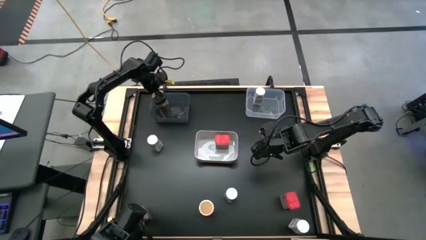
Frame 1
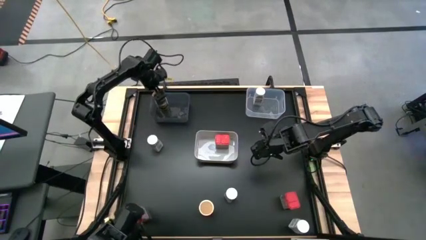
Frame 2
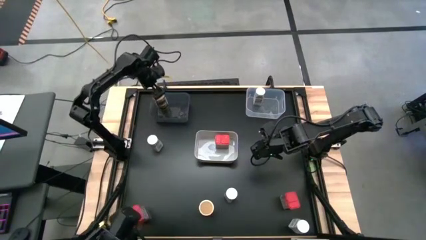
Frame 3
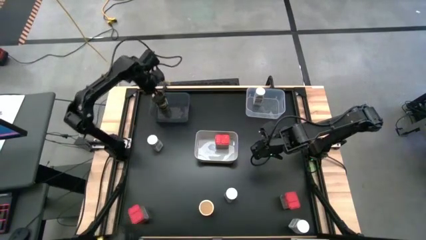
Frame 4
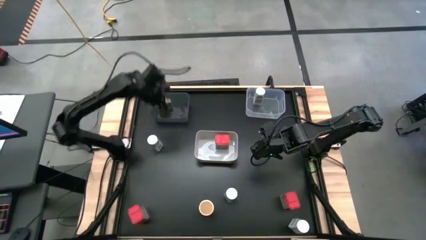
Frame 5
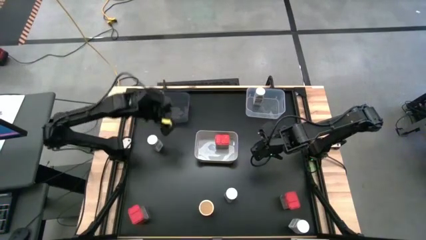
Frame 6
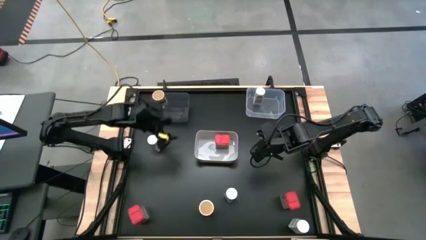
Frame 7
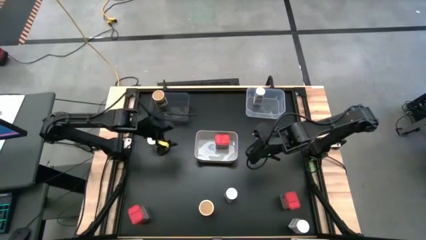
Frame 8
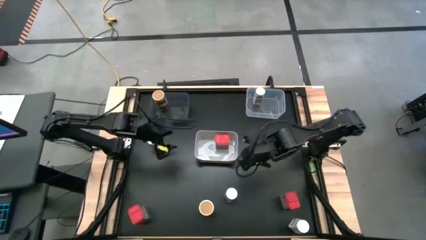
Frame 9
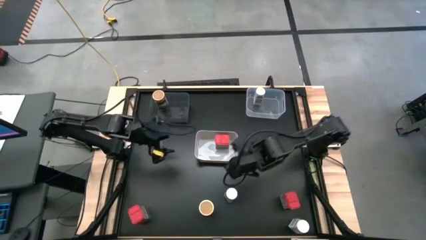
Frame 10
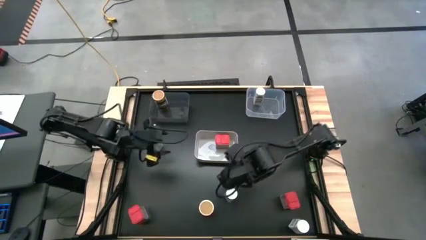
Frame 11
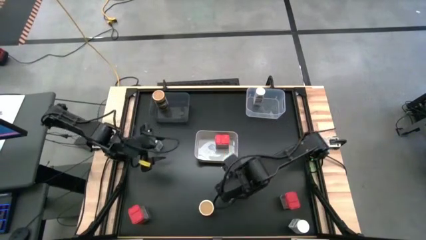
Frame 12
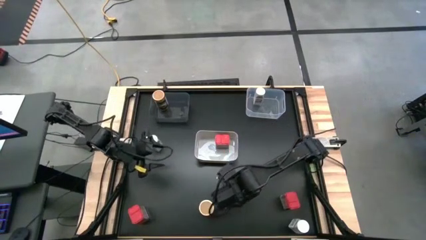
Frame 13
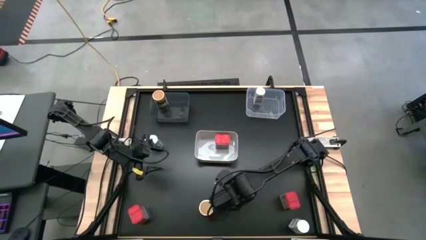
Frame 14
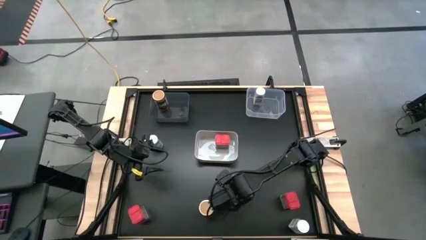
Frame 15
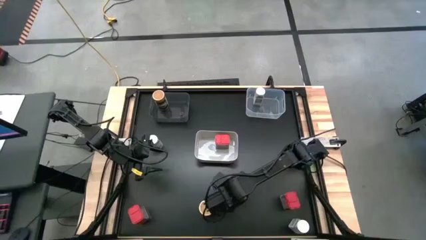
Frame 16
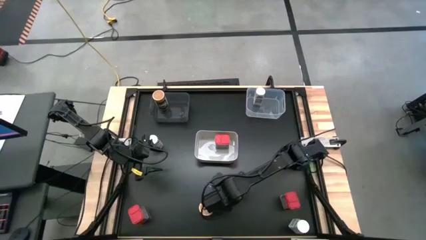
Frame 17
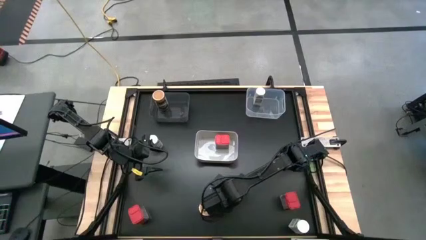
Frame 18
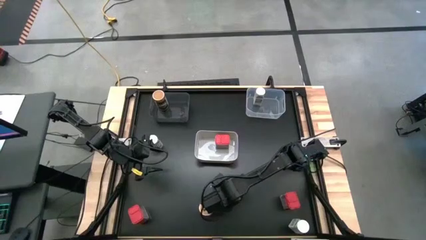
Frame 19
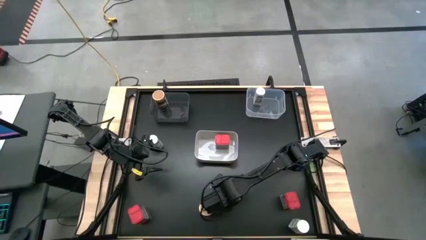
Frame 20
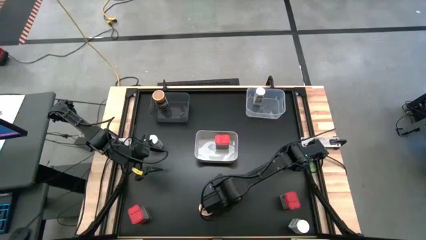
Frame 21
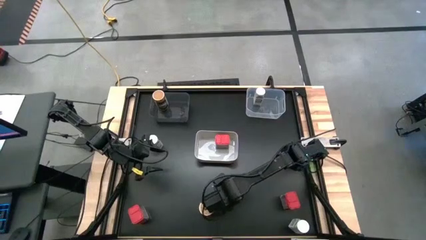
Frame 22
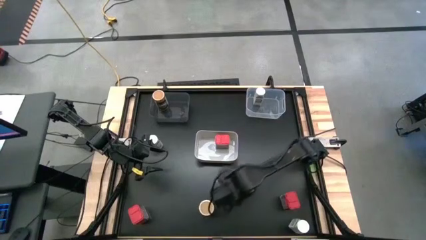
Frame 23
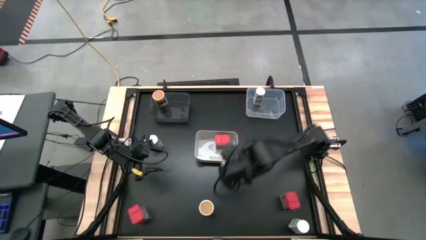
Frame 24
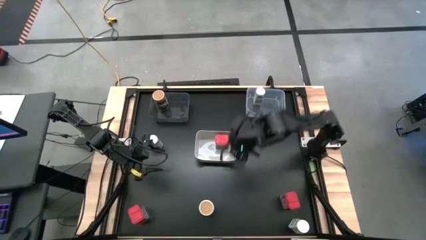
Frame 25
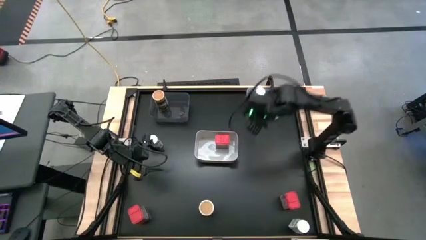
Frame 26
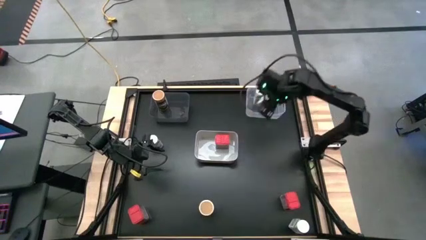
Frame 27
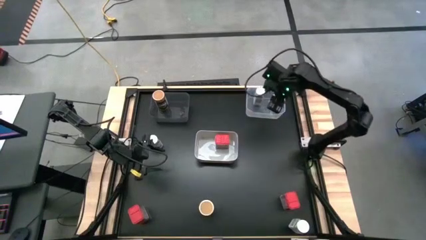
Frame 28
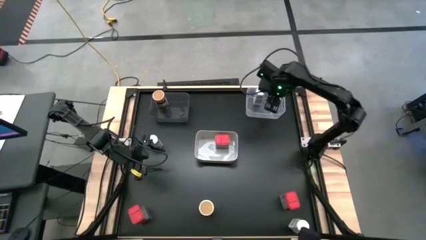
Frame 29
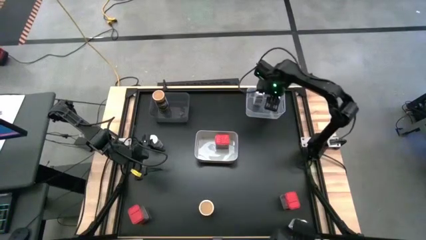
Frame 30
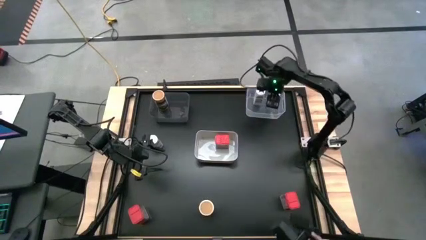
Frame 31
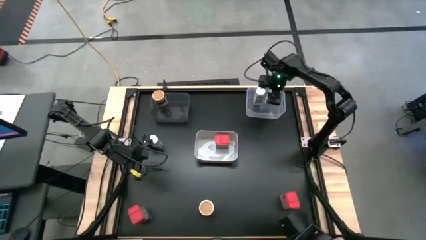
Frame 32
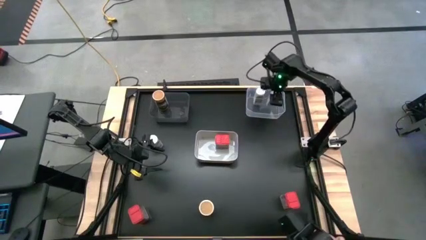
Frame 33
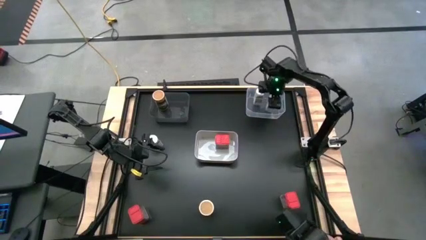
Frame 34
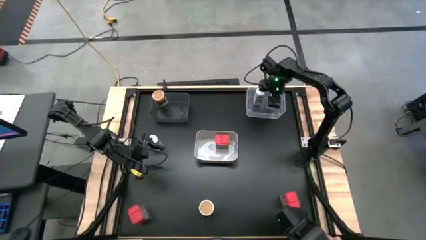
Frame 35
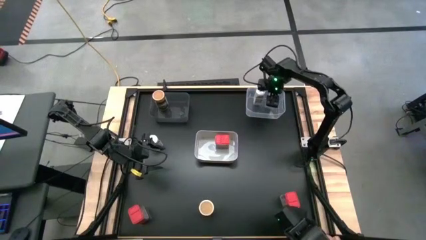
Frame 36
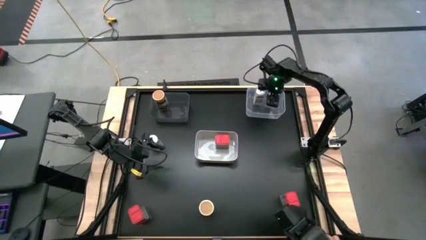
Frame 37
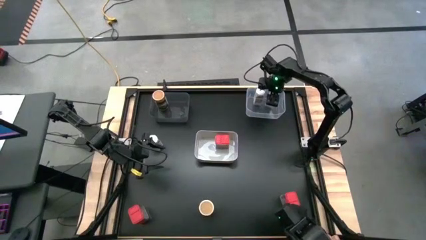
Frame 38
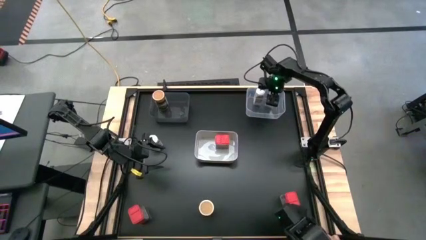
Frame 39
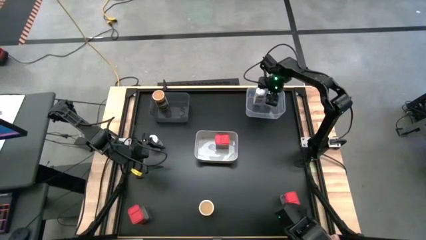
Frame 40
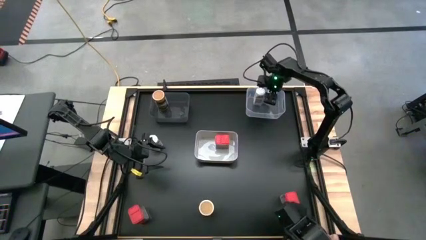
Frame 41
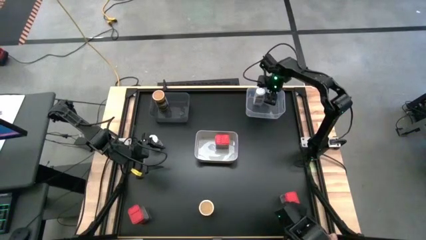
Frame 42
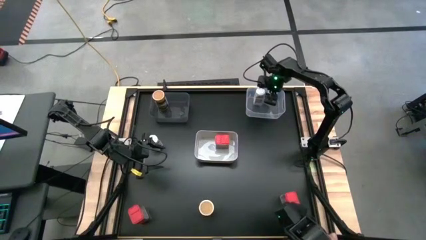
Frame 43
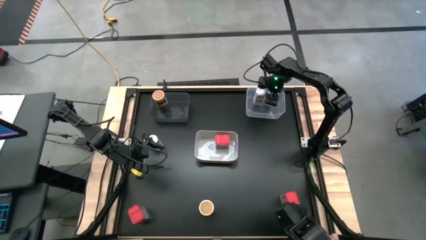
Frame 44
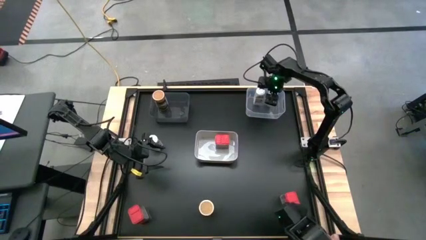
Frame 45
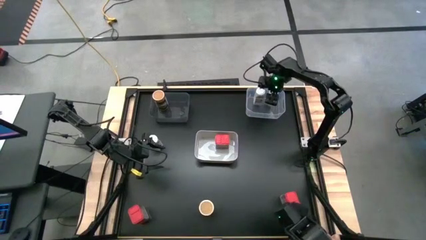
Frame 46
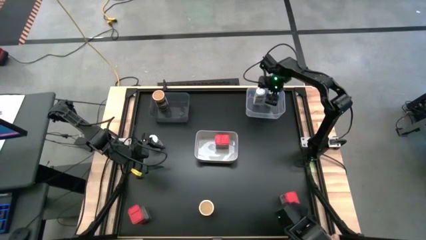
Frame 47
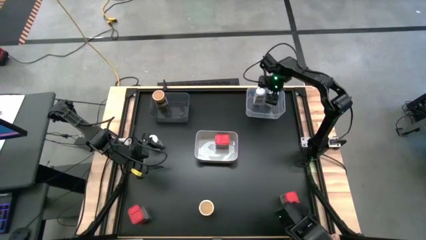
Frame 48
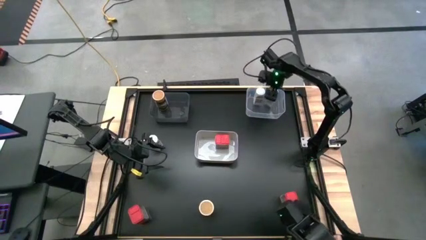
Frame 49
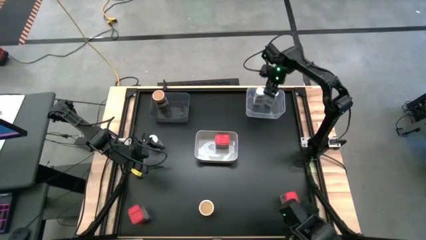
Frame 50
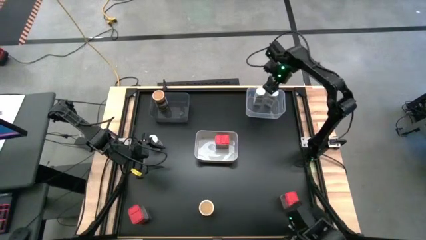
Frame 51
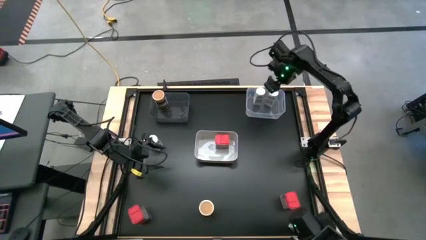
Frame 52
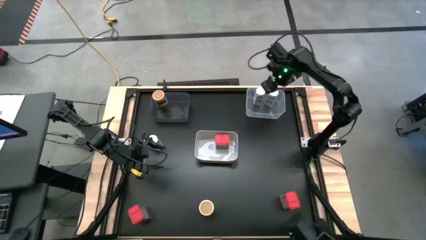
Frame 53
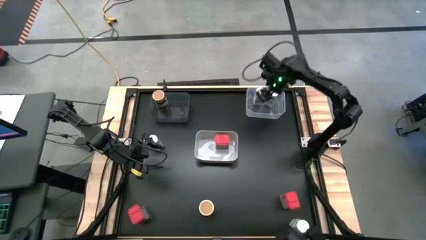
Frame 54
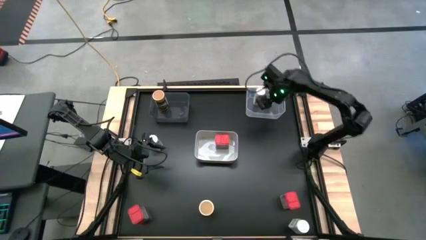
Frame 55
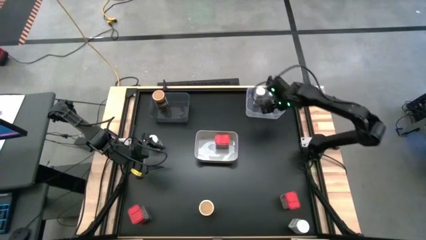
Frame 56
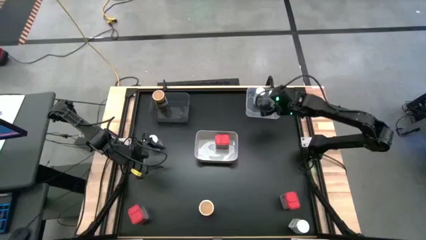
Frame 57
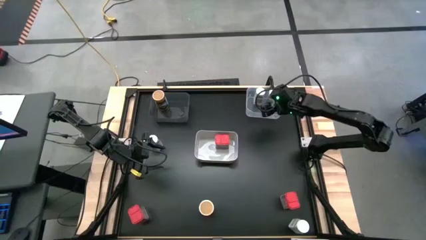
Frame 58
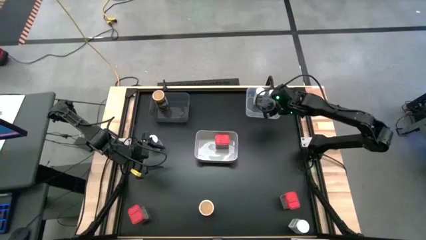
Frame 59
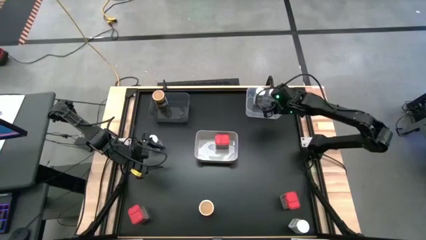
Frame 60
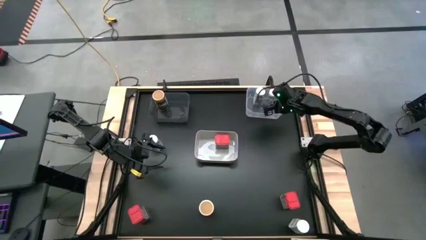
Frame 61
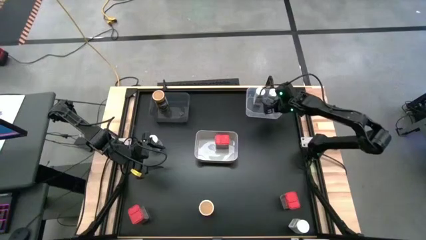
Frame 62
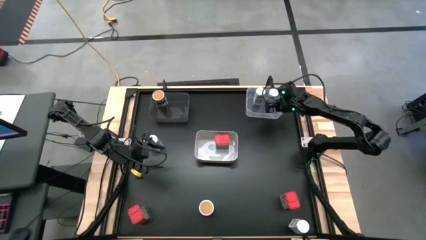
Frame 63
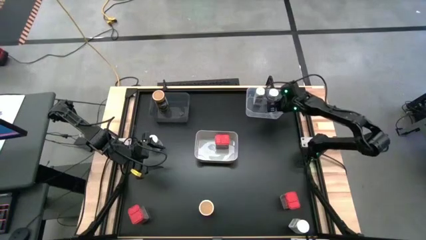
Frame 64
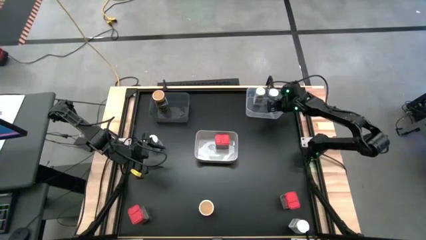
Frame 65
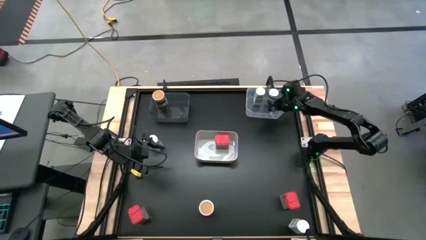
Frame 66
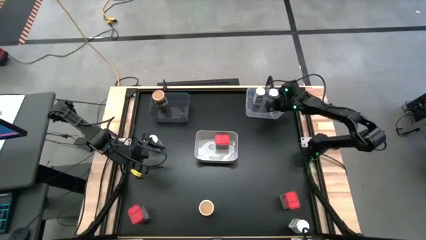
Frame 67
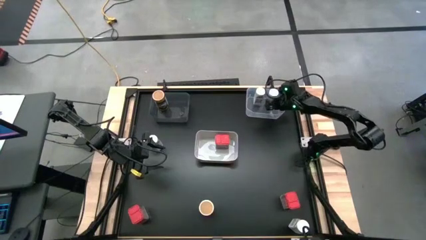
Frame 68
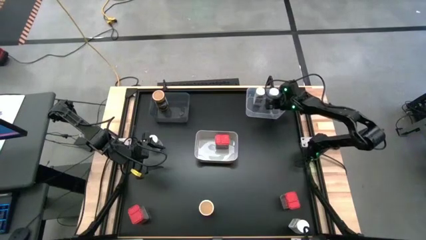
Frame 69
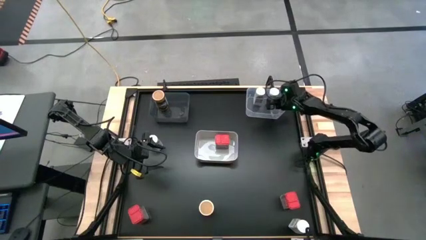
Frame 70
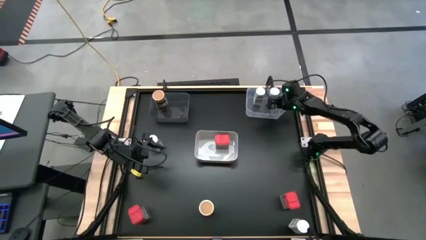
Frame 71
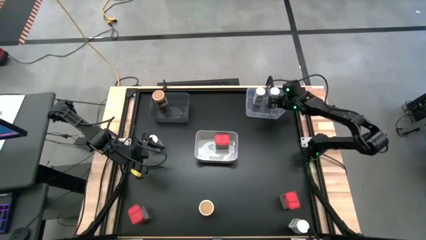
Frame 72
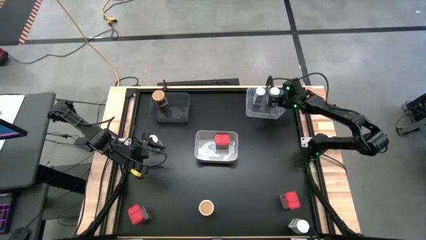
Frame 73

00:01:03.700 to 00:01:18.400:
Task: Sort spices by type
Put the white seasoning bottle into the transparent bin

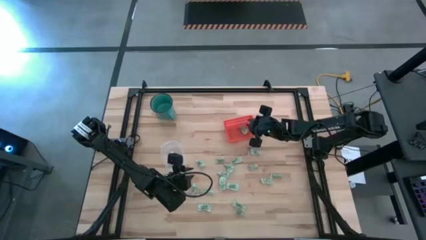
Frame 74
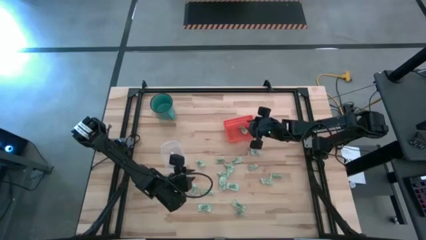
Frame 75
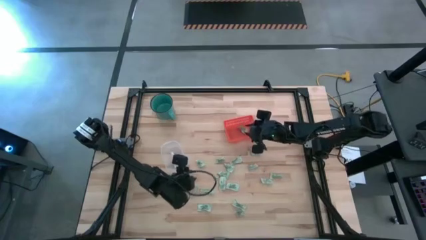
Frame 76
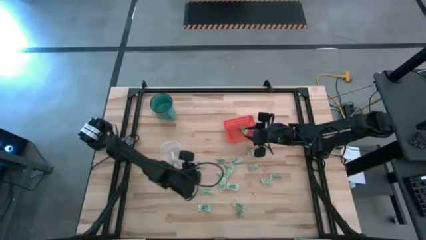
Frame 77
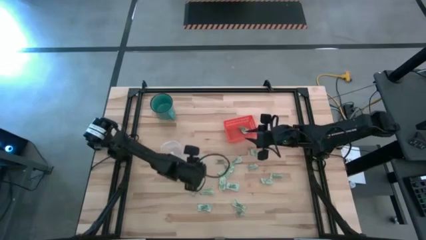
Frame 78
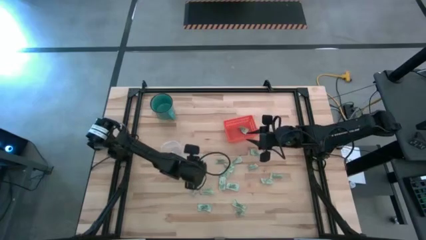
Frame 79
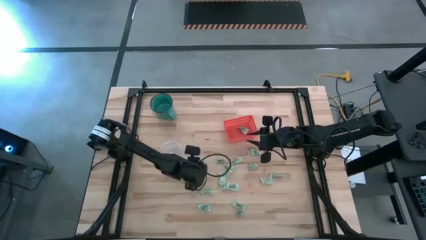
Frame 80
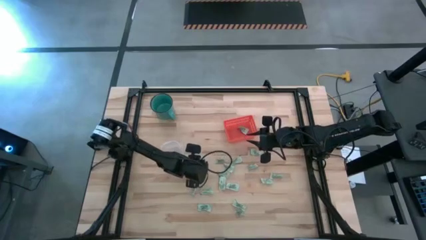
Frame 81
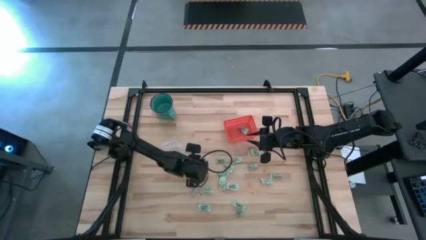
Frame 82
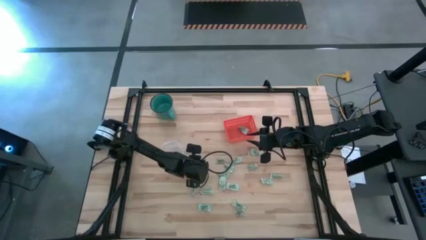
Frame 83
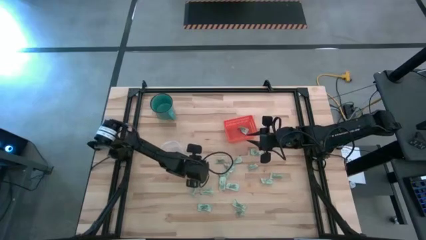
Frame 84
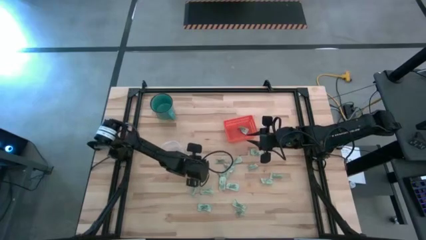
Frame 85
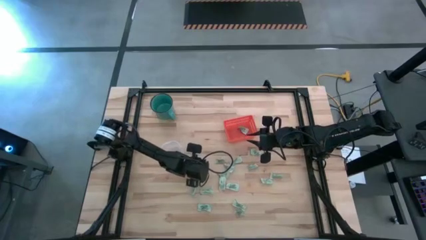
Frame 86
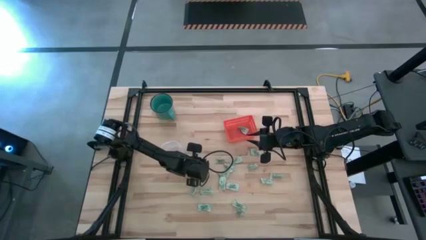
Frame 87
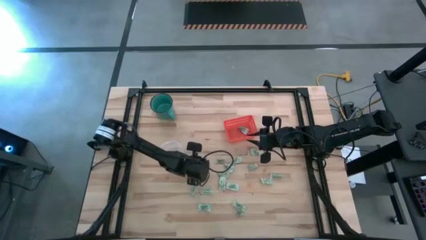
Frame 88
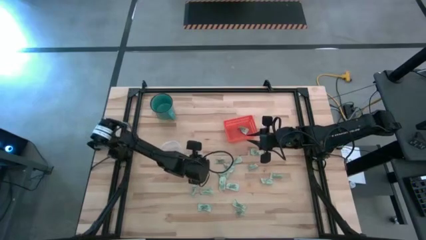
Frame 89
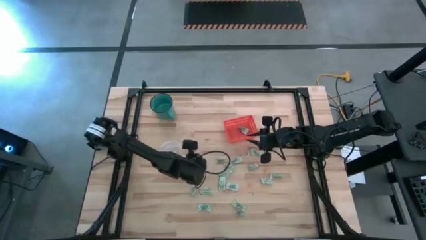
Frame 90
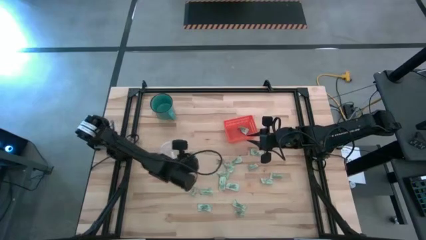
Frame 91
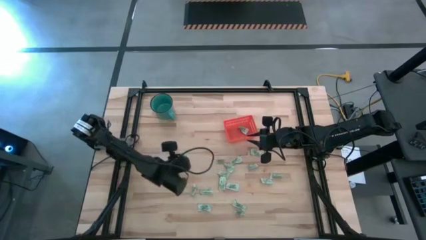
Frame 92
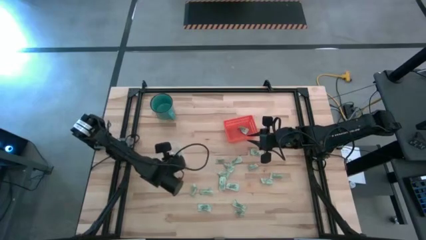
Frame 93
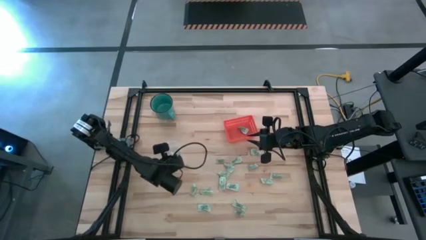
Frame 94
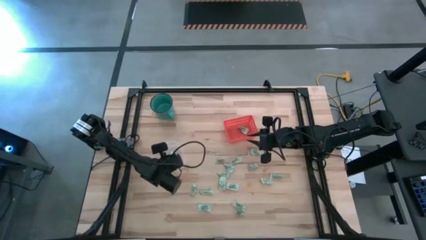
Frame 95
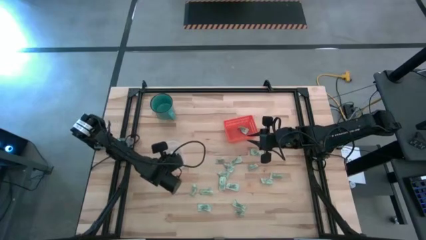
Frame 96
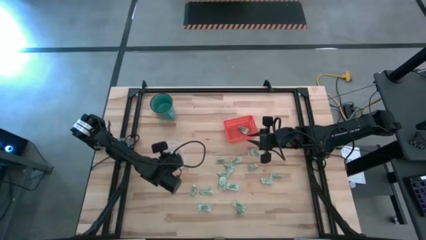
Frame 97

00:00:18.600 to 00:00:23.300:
Task: Pick and place items into bin
Put the light green stevia packet into the transparent container
